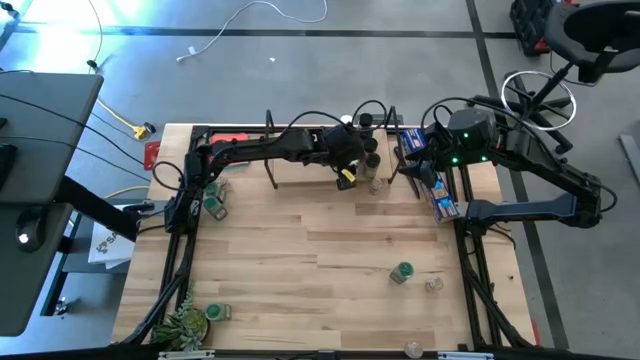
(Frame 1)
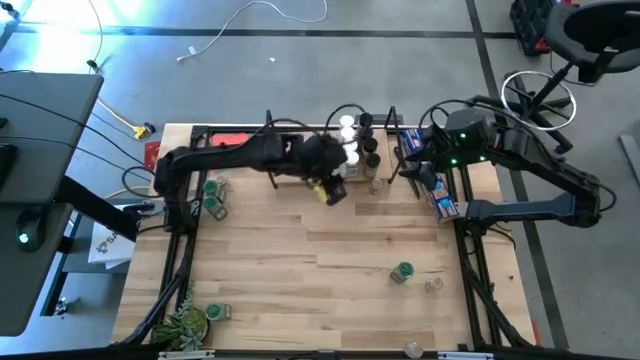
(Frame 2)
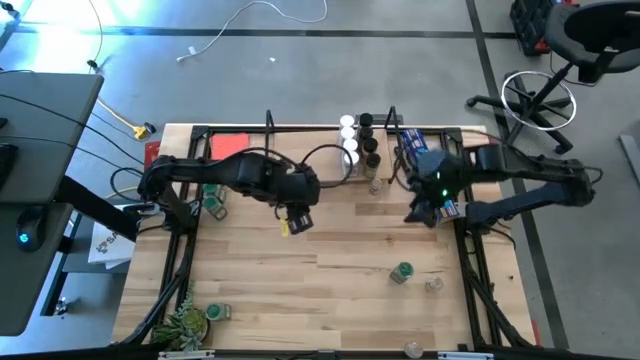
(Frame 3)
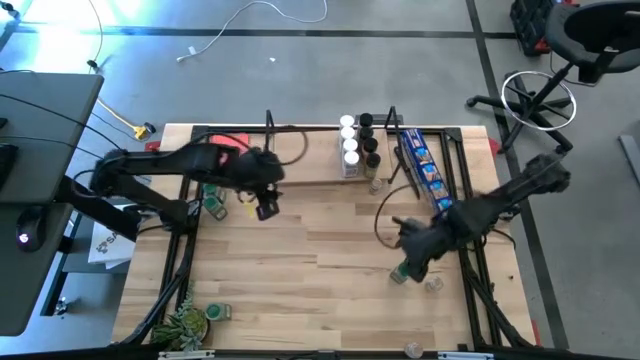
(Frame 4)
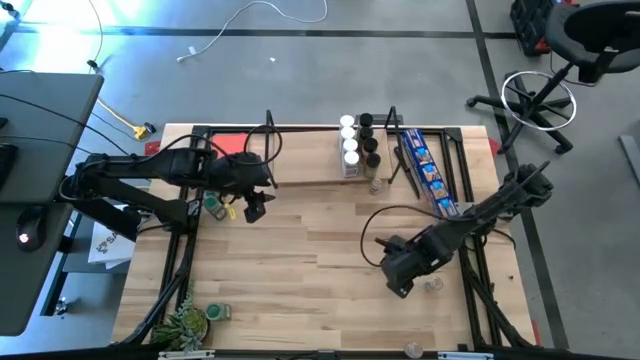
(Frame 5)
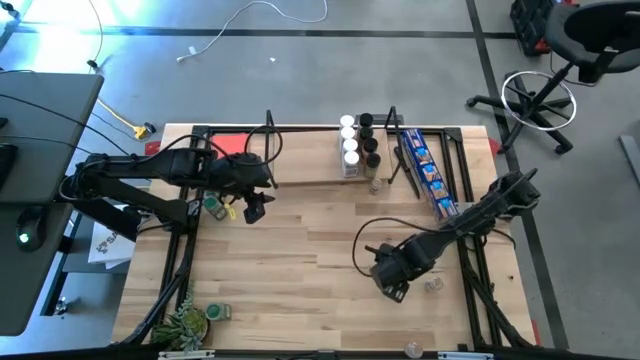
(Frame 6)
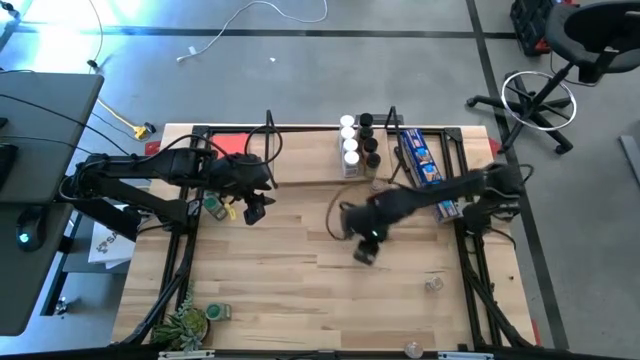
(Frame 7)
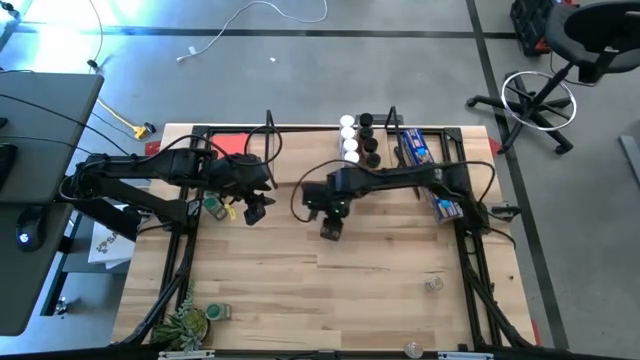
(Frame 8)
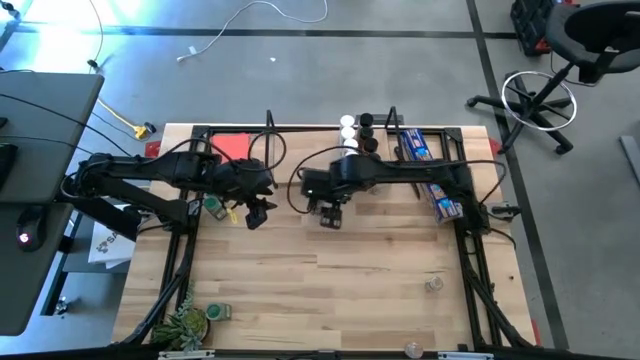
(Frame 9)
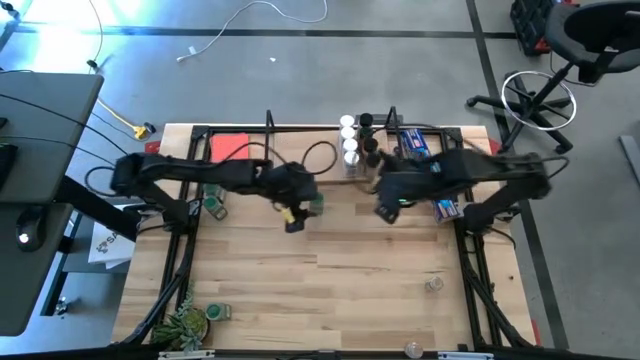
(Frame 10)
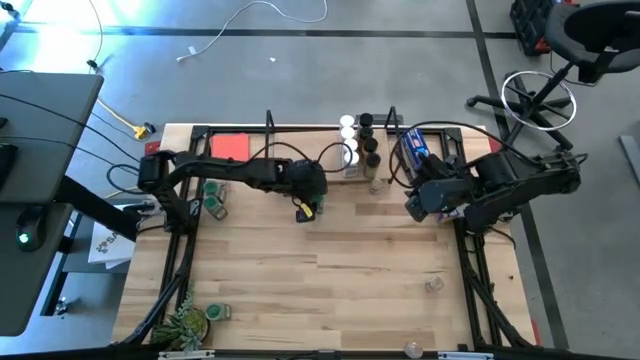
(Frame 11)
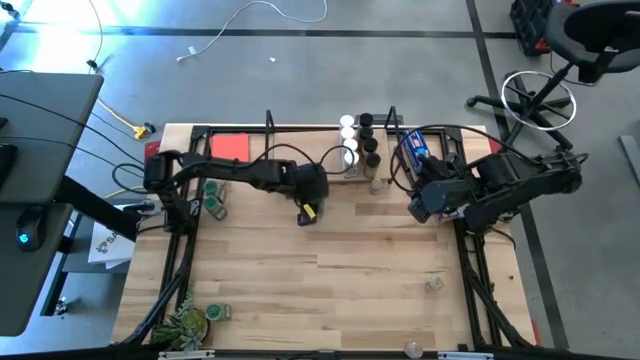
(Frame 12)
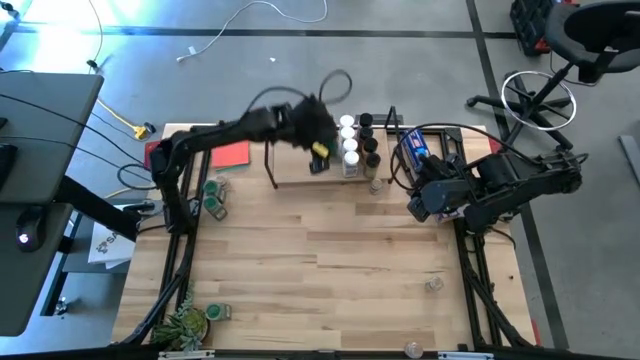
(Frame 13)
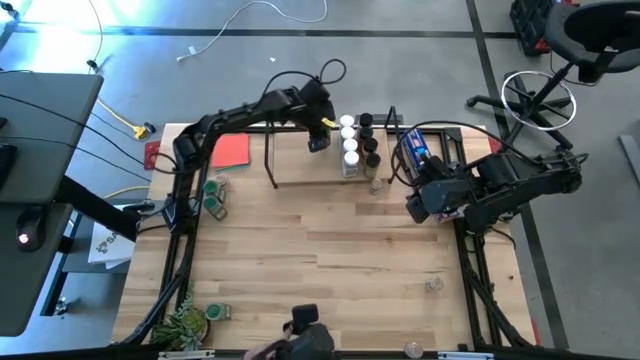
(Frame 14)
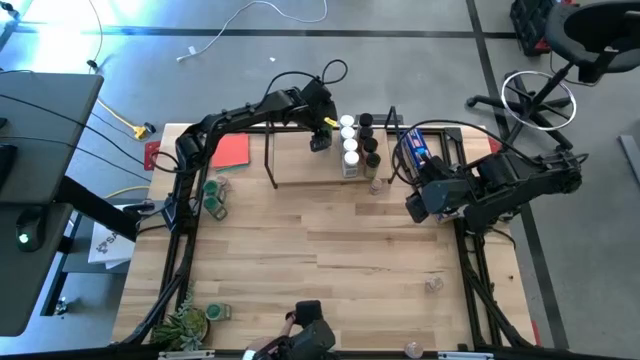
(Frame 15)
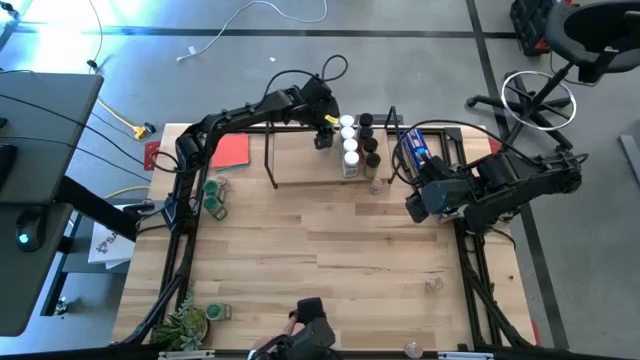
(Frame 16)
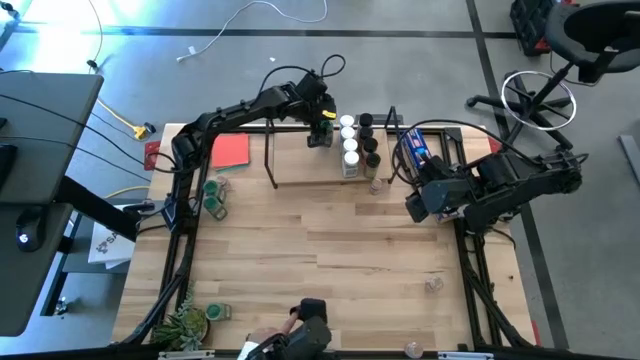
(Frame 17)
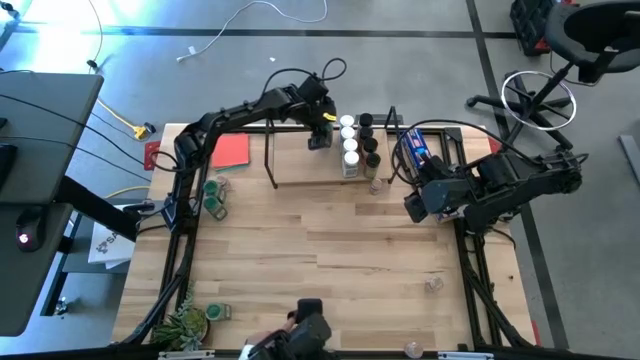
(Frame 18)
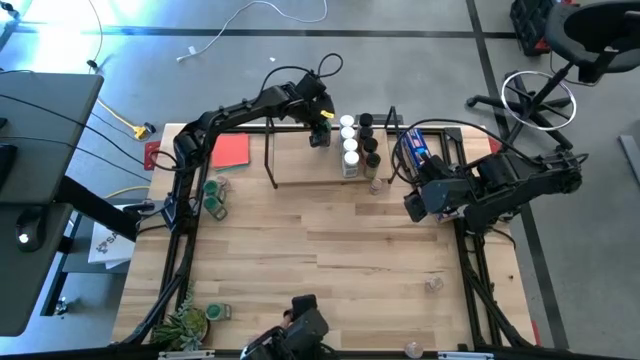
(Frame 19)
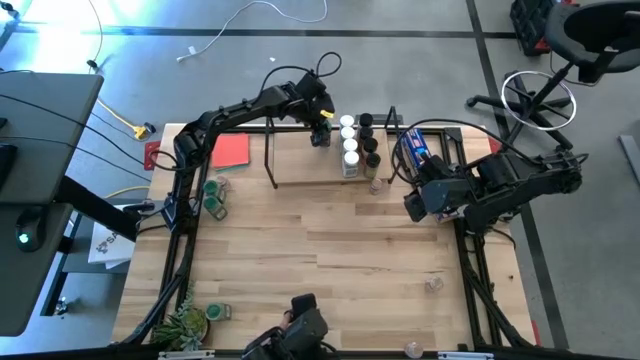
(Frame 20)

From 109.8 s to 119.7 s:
Task: Shelf spices
Put the middle right green seasoning bottle on the shelf

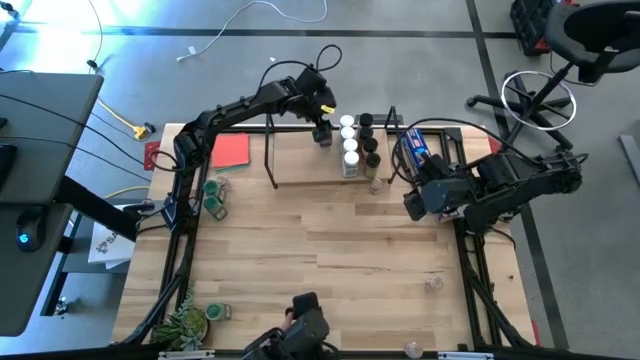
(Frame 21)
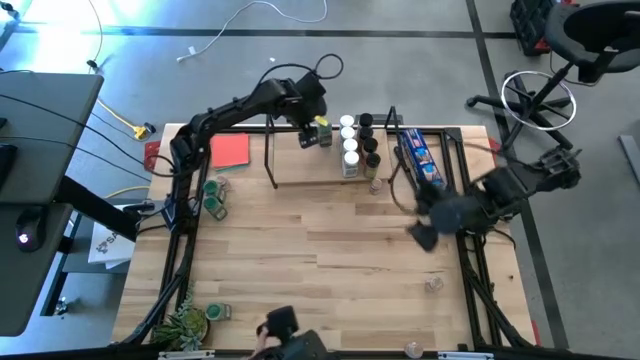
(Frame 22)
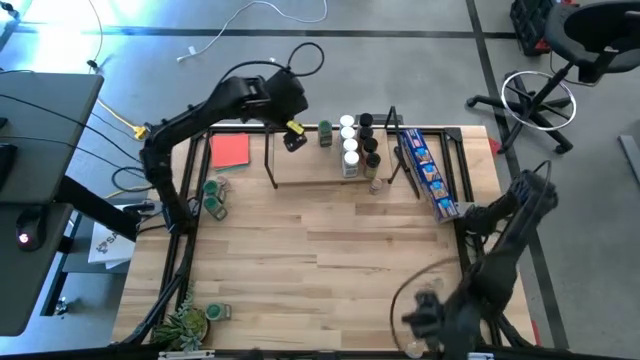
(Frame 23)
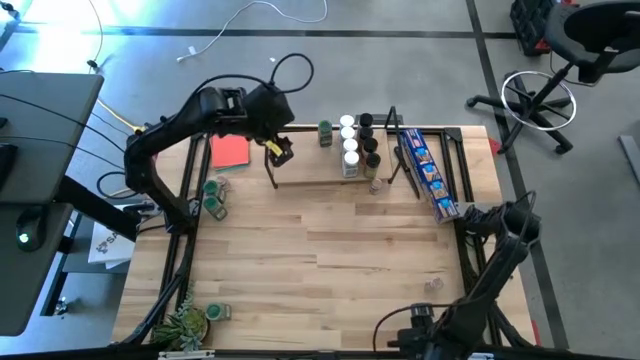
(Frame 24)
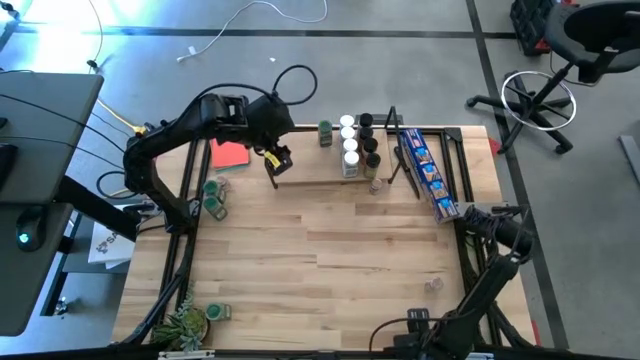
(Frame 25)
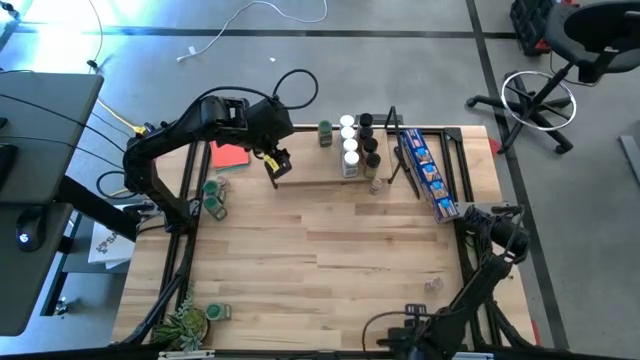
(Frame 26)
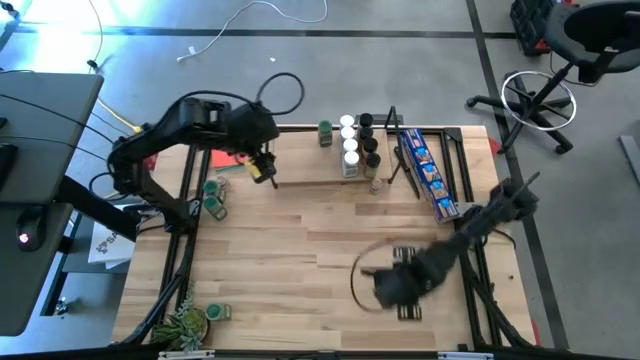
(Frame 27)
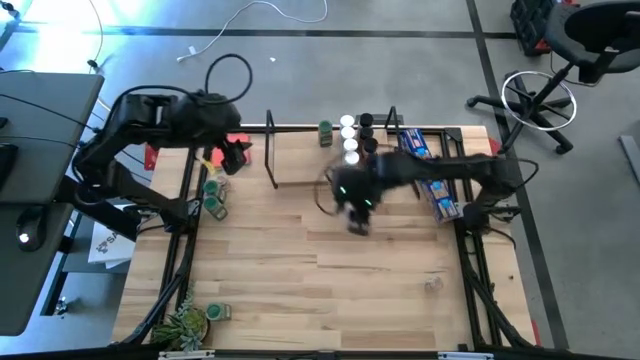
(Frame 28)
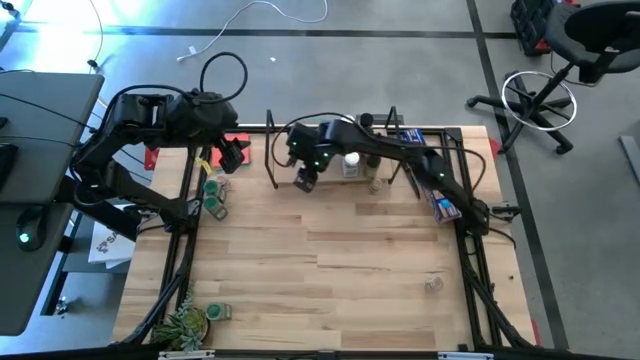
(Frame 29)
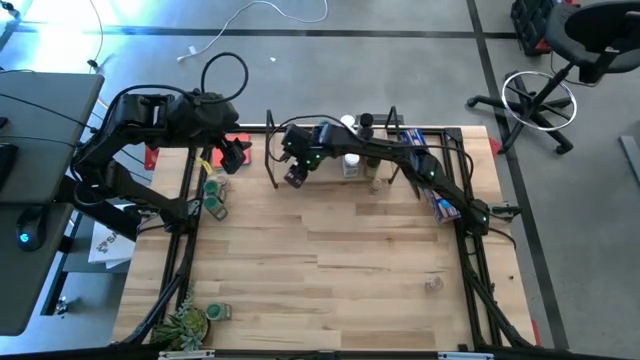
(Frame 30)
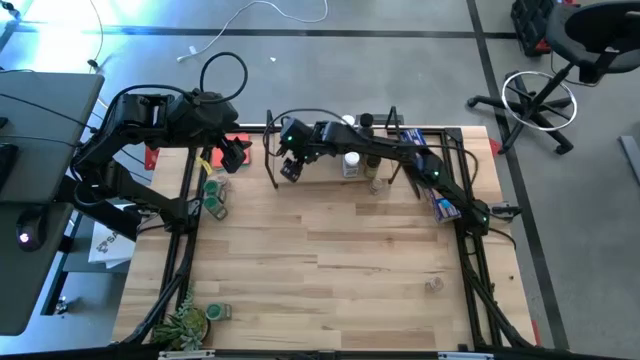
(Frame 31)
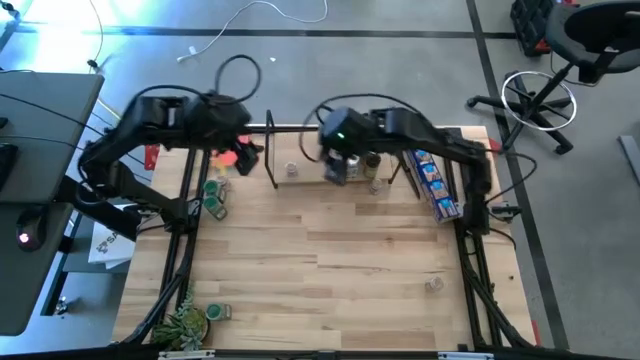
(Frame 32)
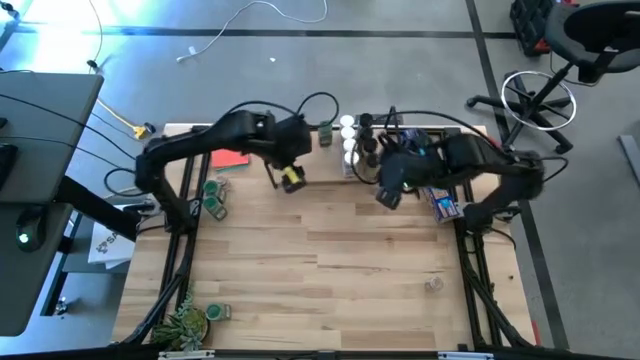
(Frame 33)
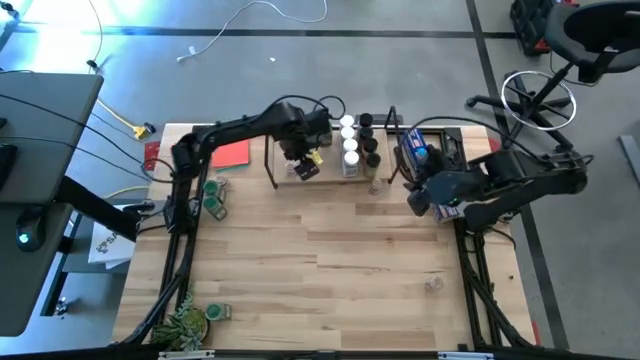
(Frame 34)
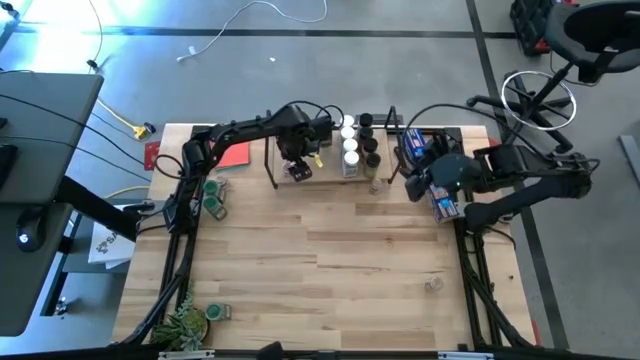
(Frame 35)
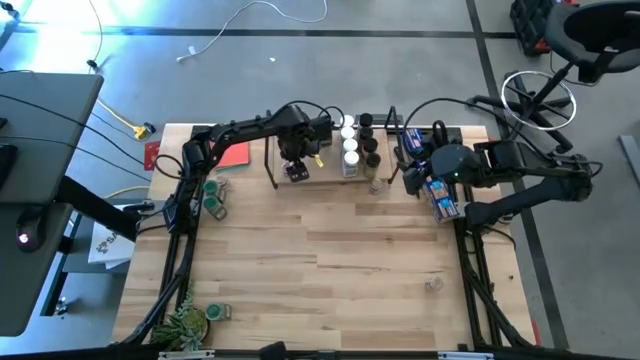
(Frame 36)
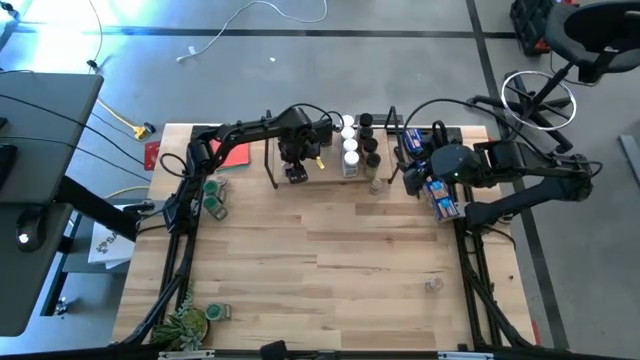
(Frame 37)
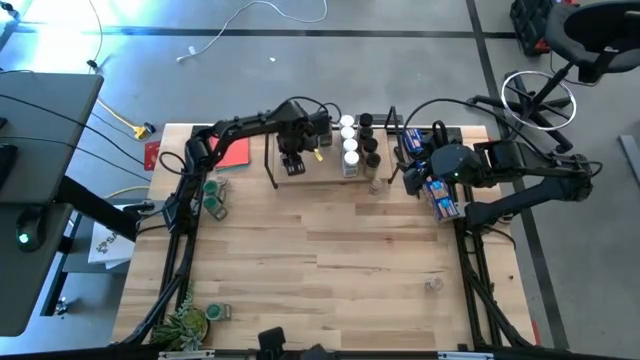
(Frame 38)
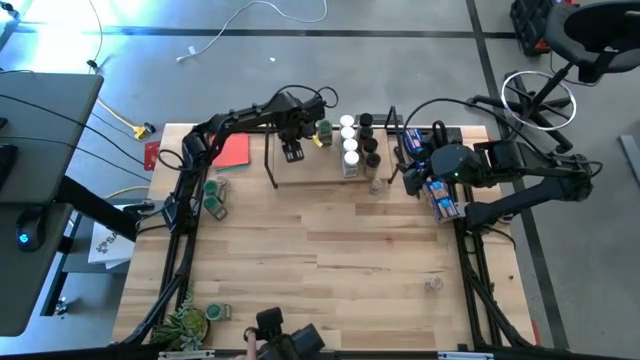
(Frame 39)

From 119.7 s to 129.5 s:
Put the bottom right brown seasoning bottle on the shelf

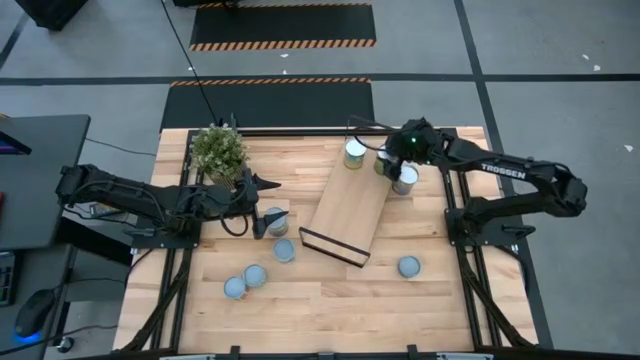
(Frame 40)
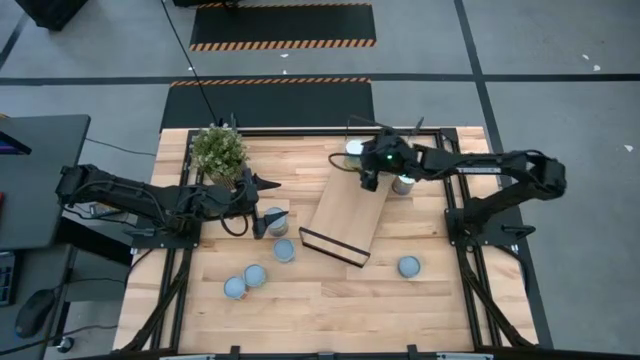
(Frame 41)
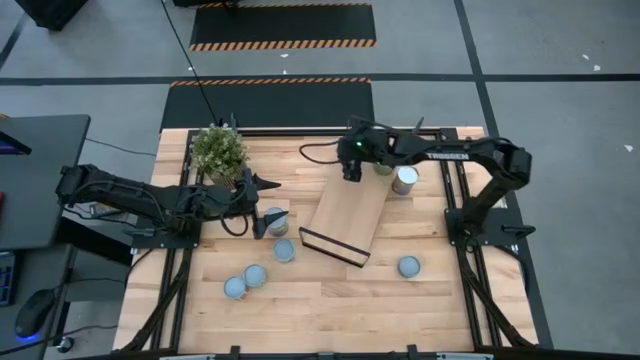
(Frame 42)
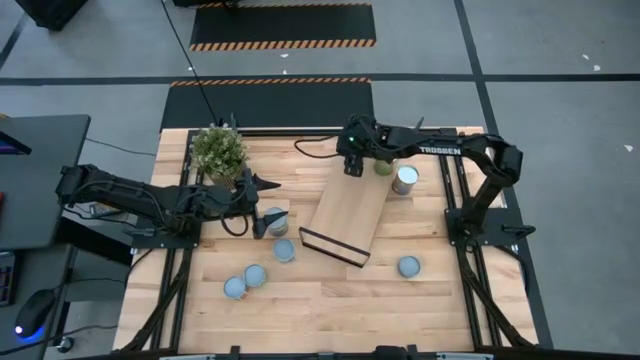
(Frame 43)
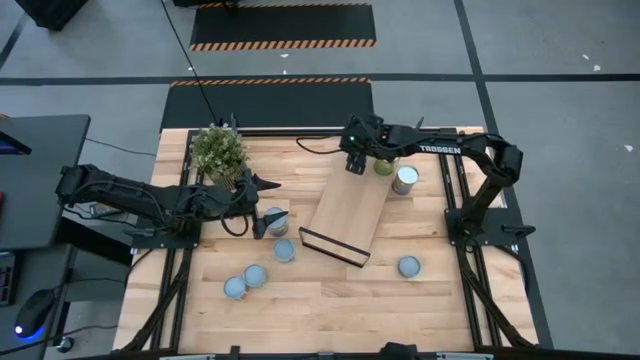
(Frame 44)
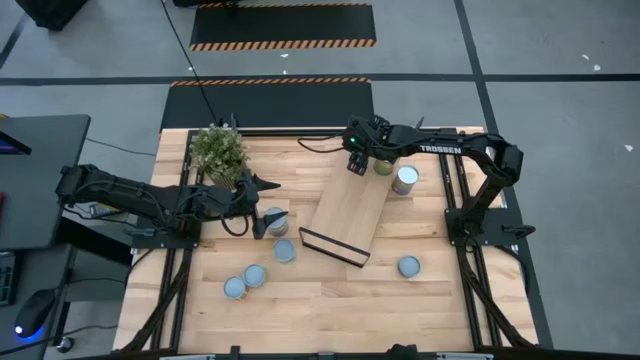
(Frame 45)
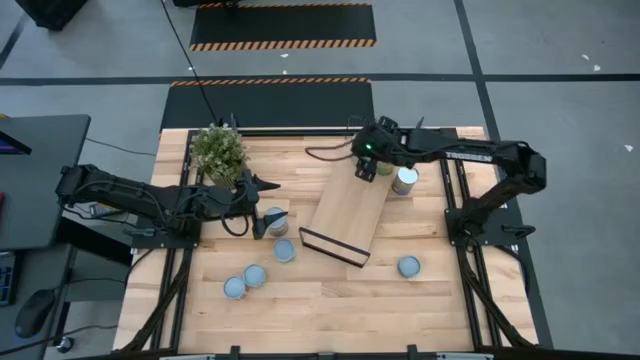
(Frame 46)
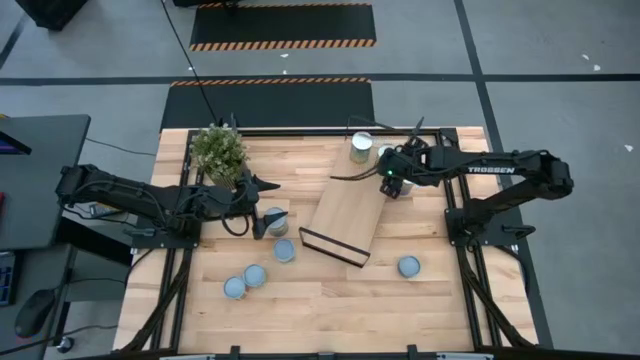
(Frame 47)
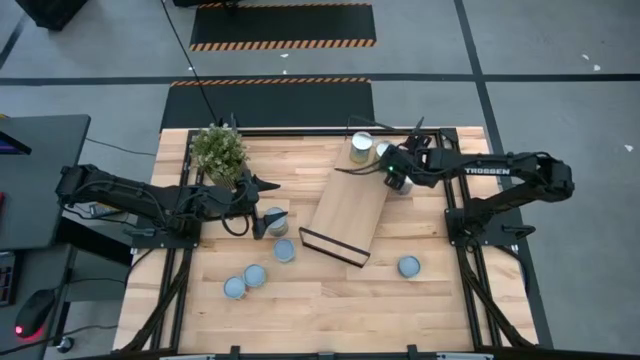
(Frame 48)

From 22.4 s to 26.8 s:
Task: Pick and place cans onto a shelf
Adjust the canned goods on the shelf
